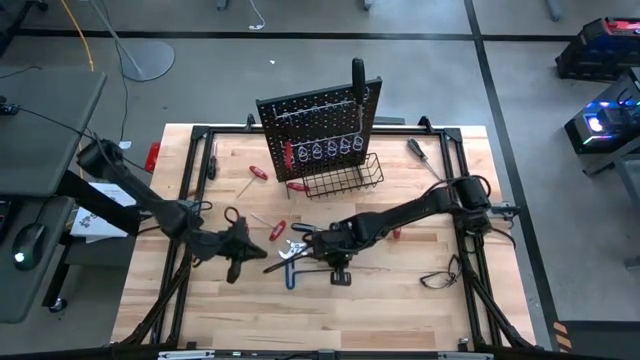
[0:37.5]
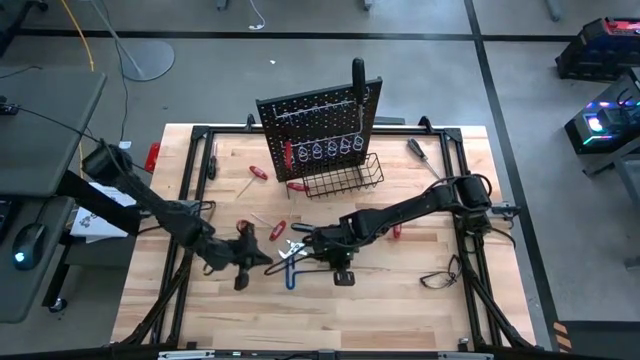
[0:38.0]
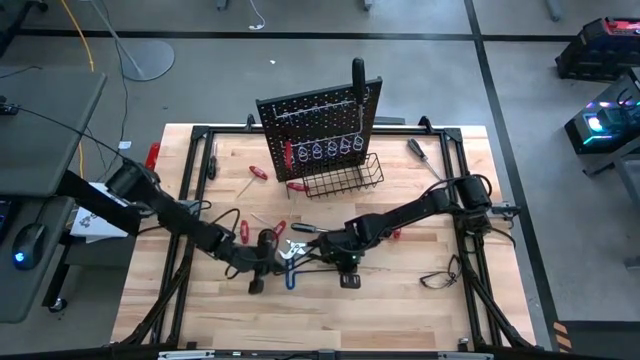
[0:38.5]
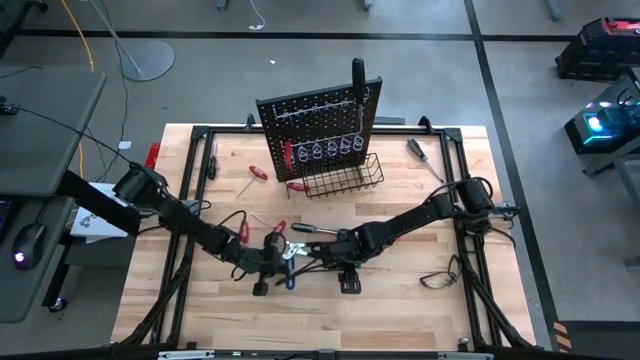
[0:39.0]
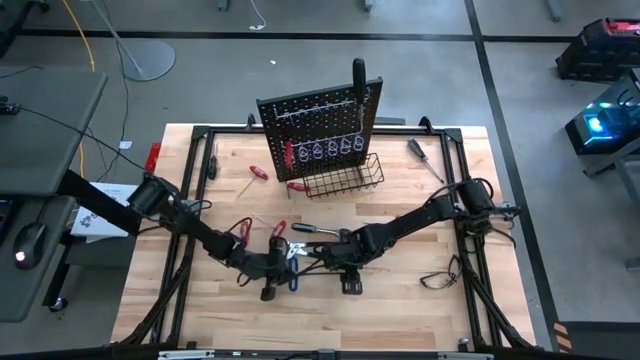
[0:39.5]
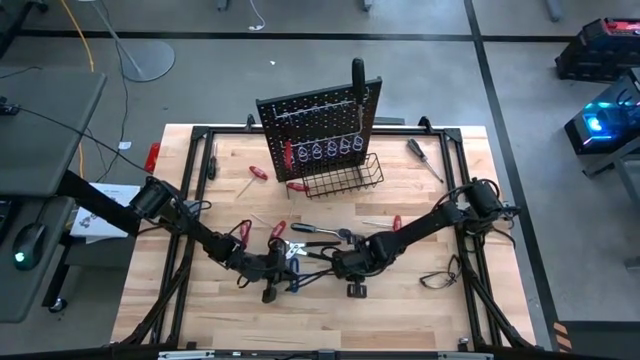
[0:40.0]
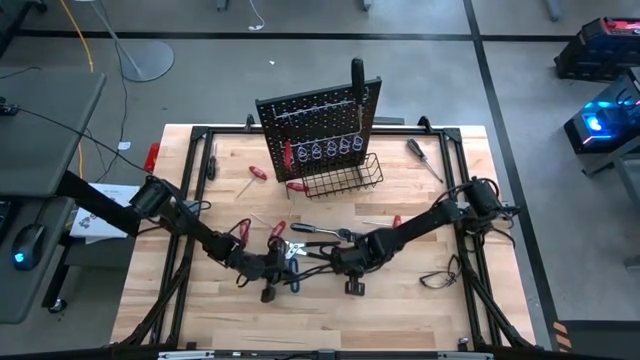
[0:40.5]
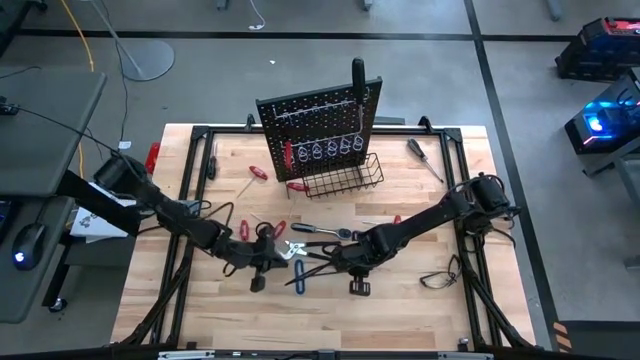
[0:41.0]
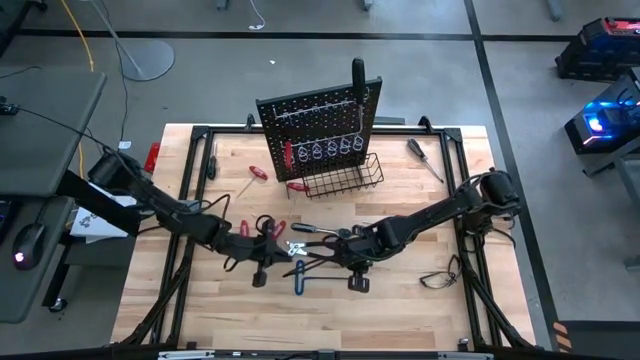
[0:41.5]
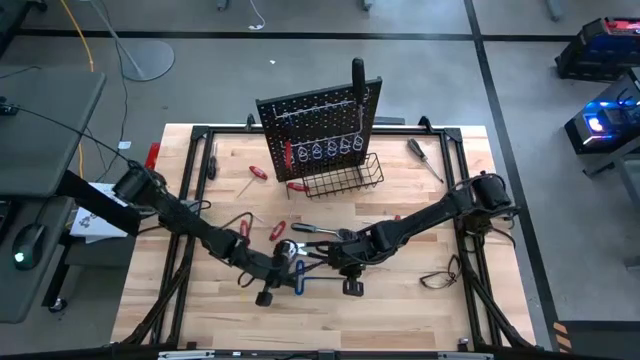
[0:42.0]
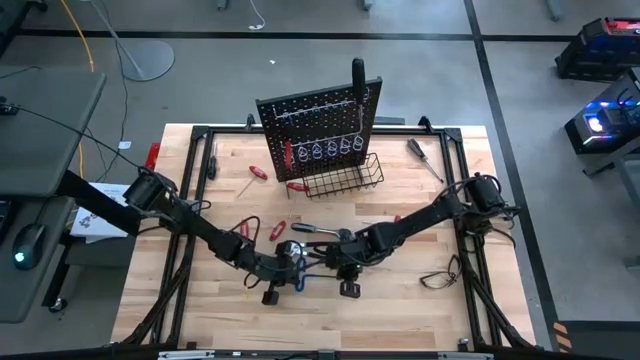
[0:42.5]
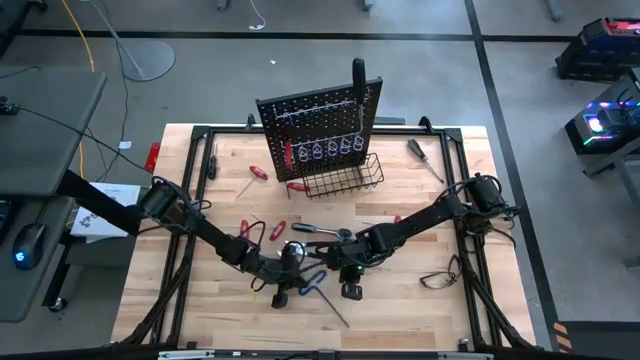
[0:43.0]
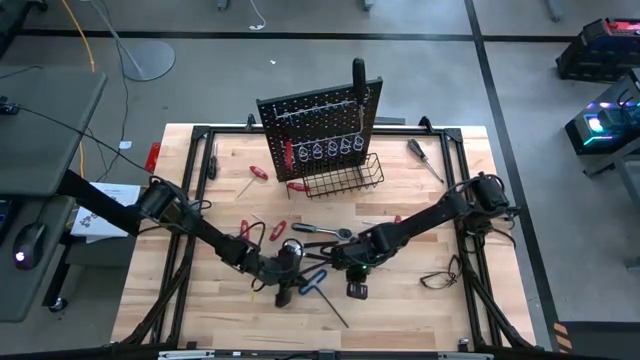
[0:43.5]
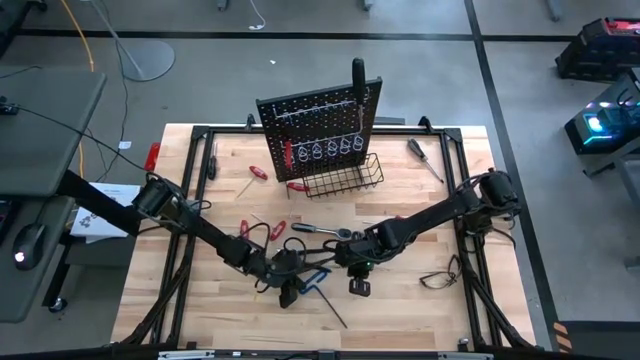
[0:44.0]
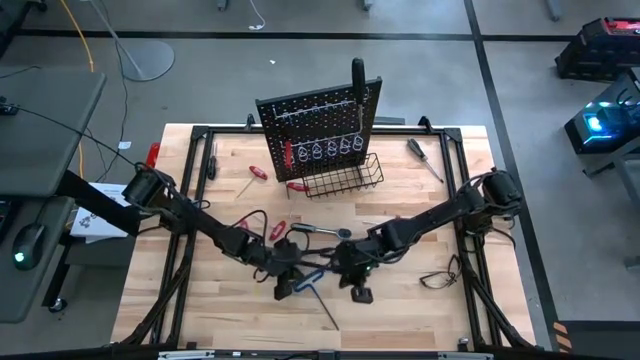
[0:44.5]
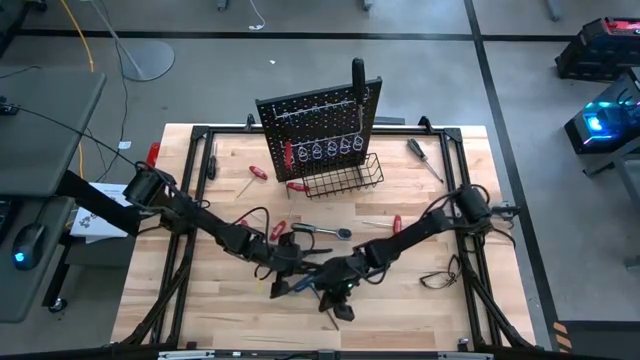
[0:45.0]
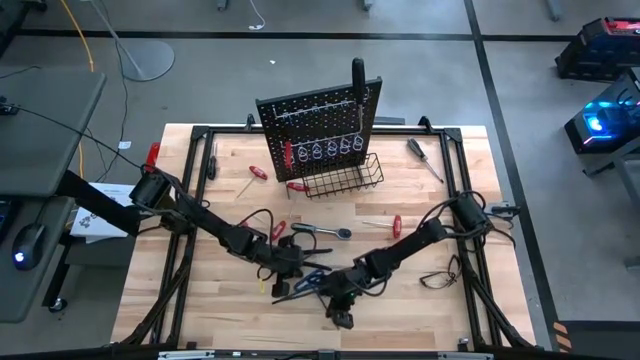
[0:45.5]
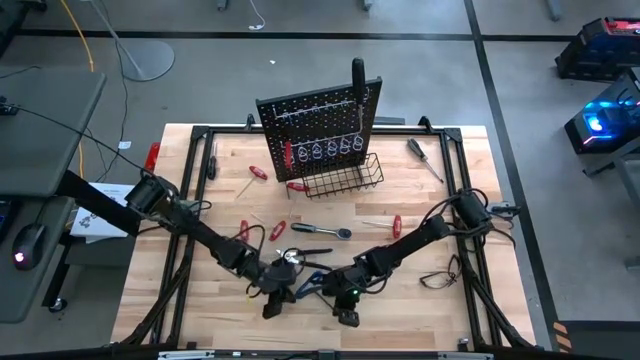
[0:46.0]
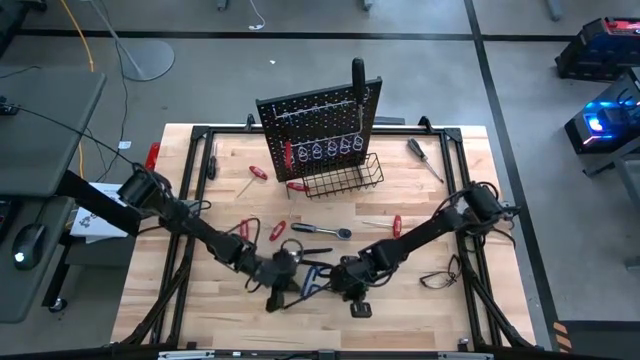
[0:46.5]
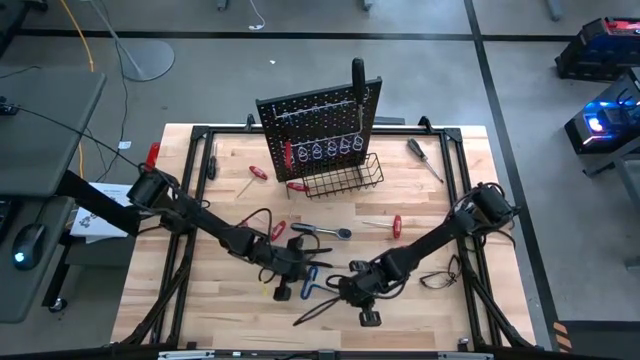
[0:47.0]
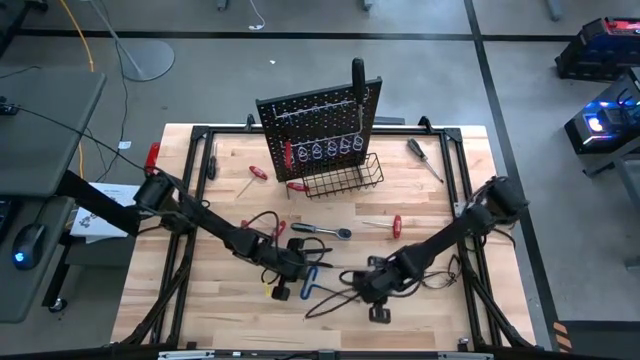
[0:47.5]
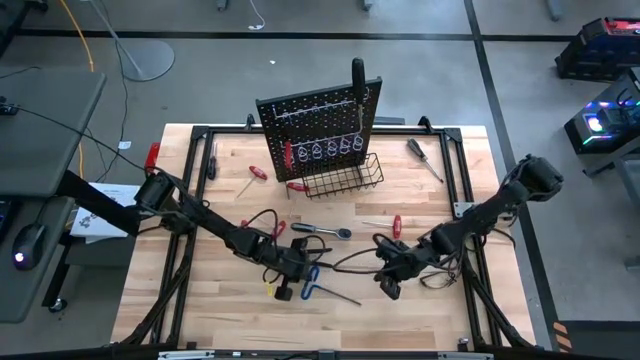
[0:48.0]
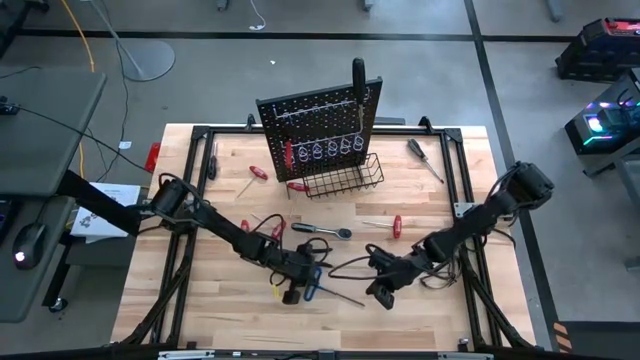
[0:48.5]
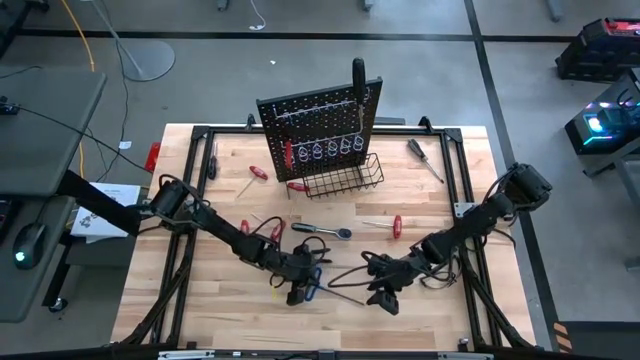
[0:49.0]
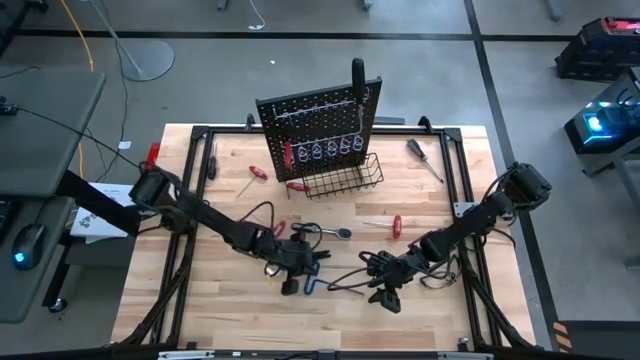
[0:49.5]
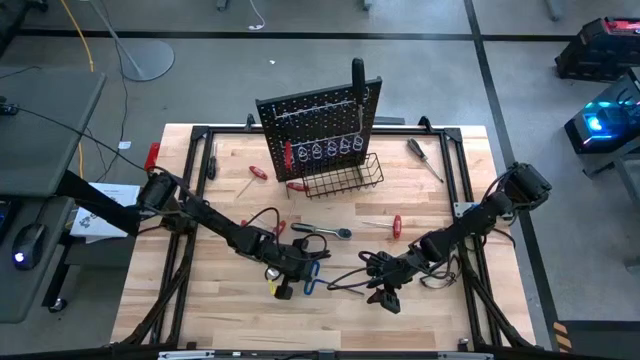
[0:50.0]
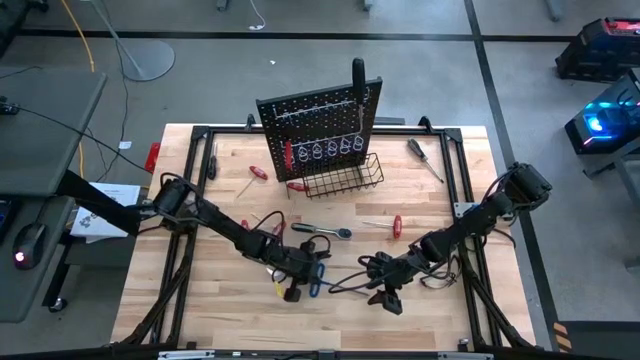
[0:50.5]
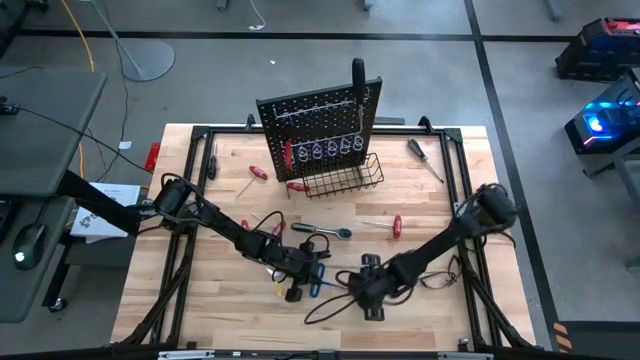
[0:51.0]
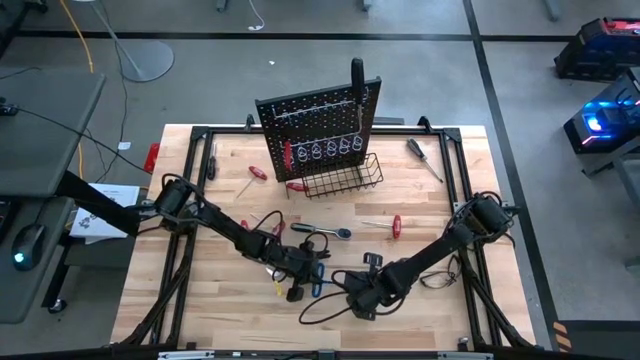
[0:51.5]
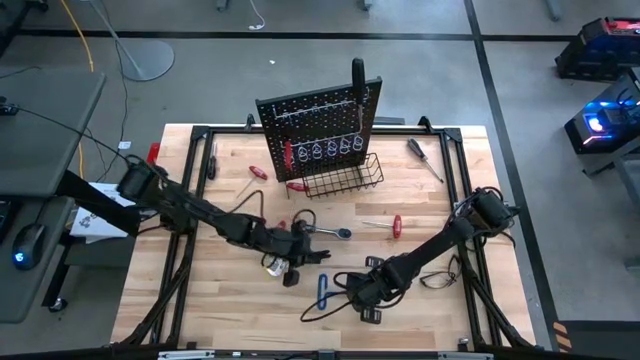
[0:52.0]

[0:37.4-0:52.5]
Task: Hang tools onto peg board
Hang the blue pick tool on the peg board

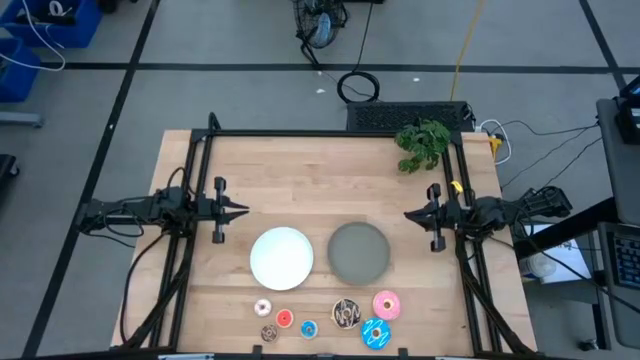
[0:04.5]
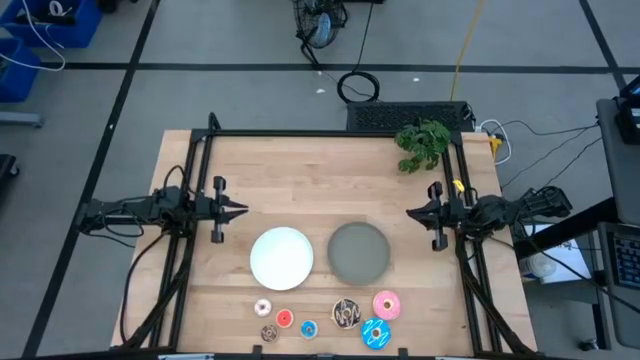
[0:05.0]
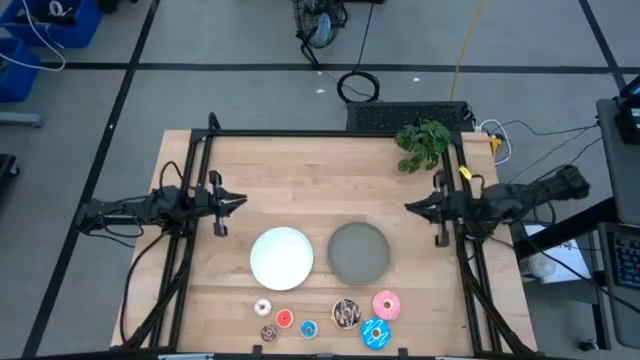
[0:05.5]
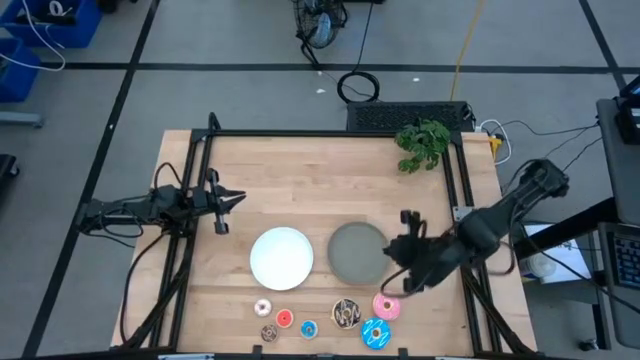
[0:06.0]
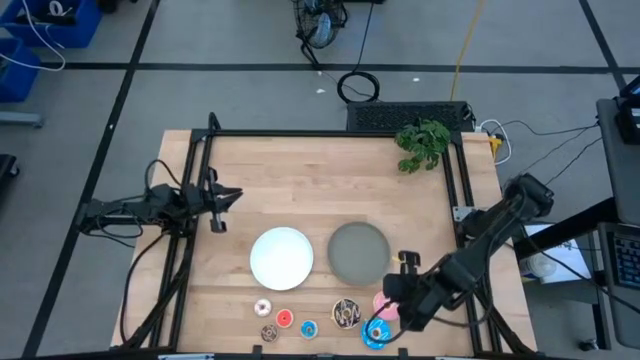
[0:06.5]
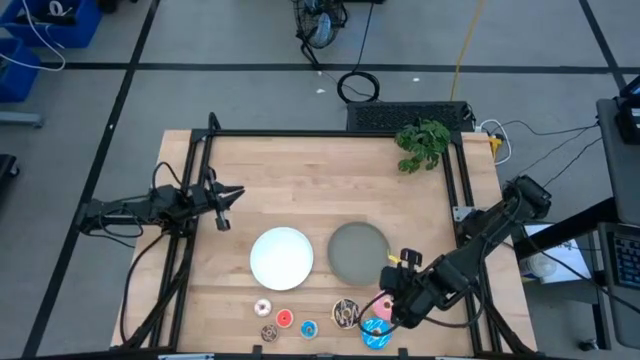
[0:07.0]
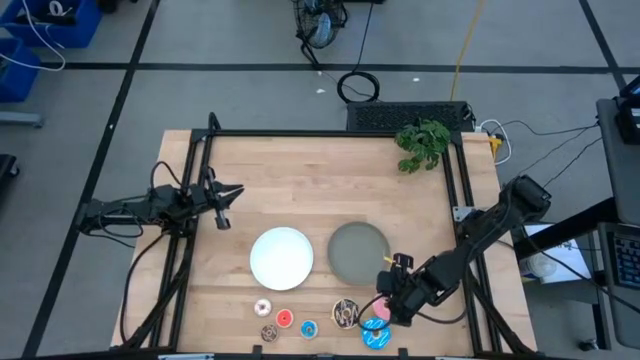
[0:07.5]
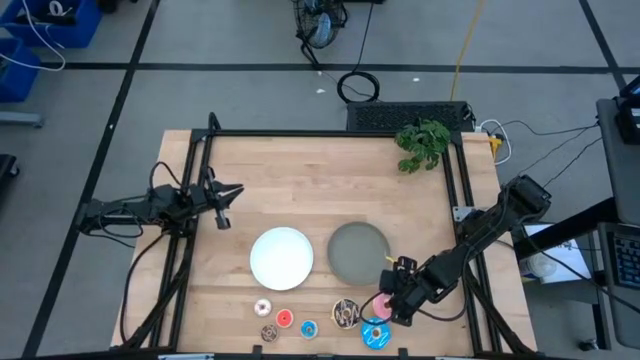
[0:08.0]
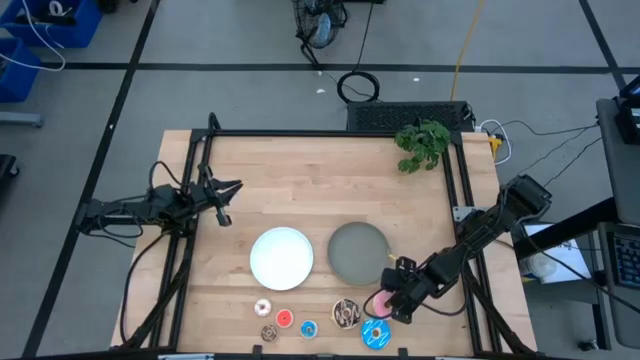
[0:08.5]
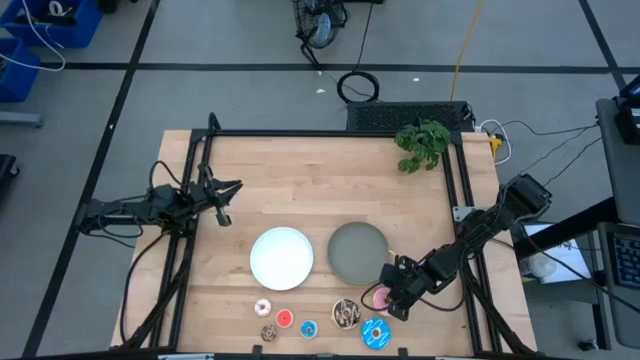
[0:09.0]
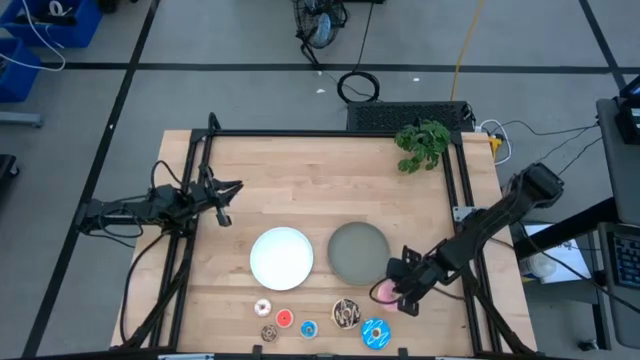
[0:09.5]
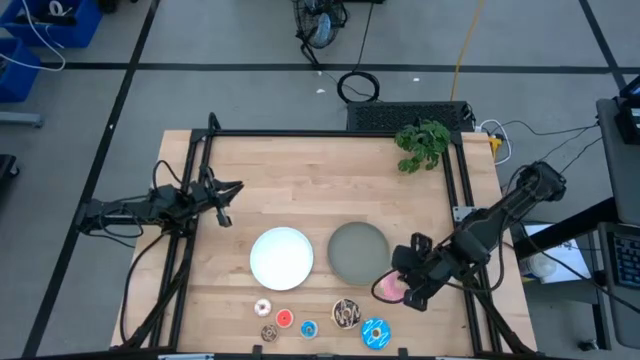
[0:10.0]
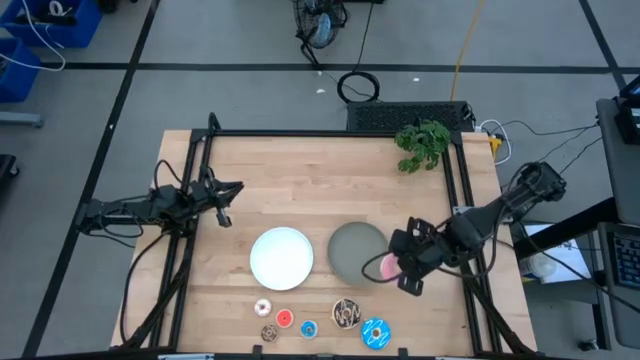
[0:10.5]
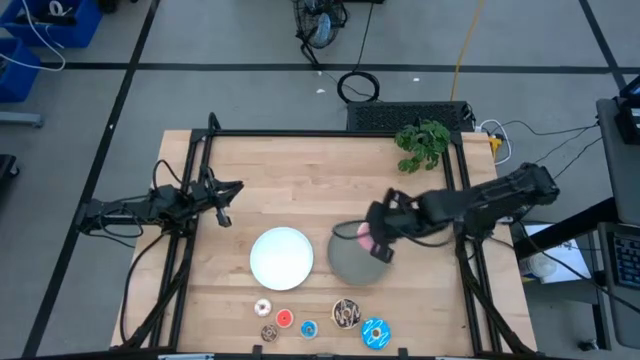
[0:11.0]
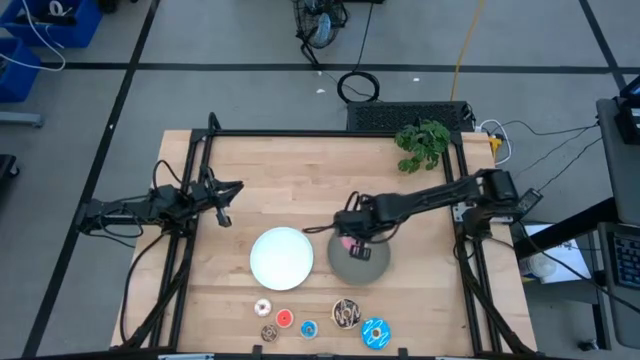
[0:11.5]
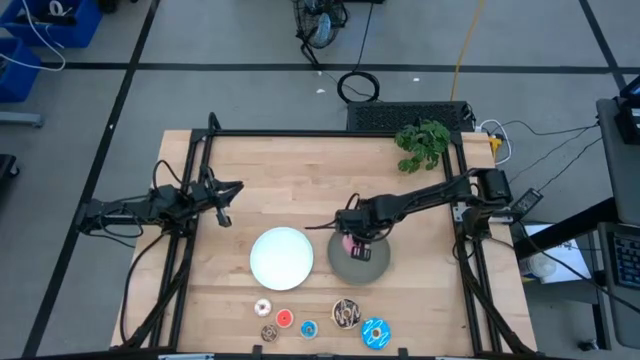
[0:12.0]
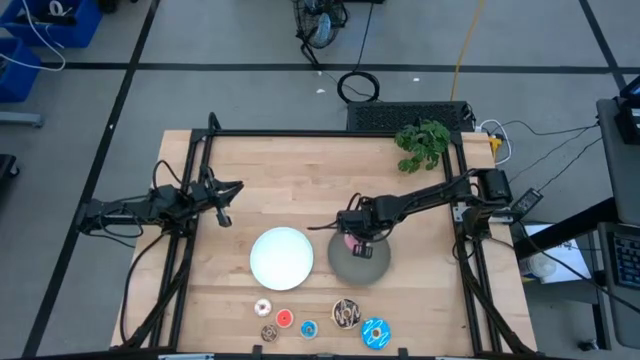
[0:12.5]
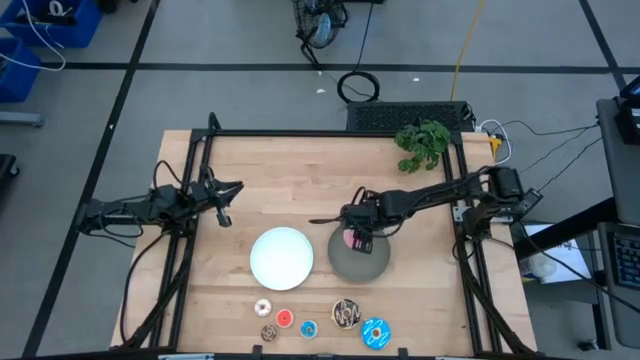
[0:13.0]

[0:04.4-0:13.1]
Task: Pick & Place donuts
Put the large pink donut on the gray plate
